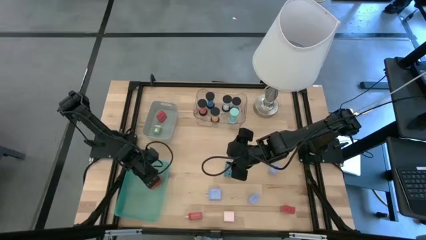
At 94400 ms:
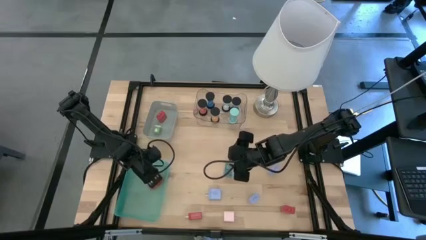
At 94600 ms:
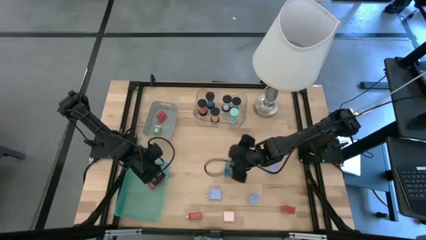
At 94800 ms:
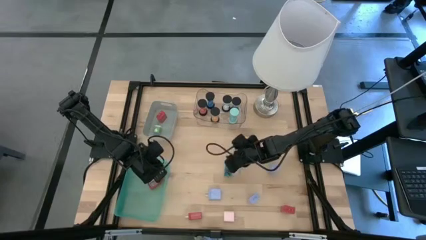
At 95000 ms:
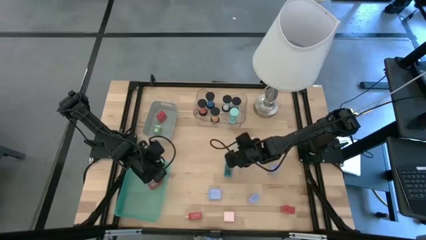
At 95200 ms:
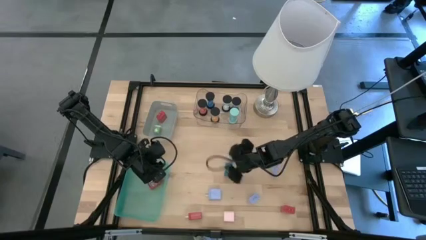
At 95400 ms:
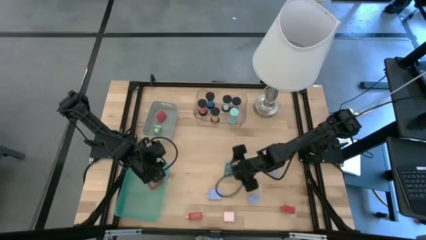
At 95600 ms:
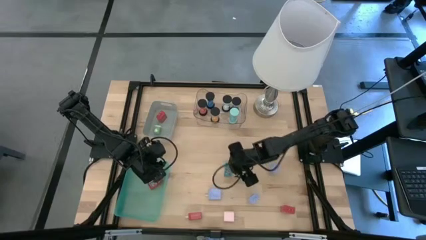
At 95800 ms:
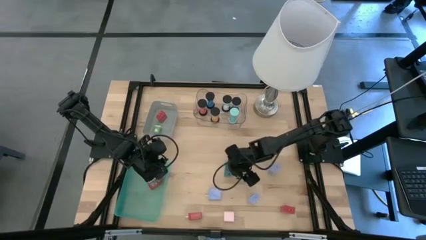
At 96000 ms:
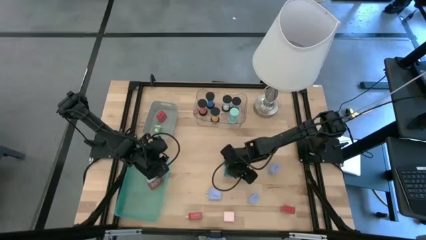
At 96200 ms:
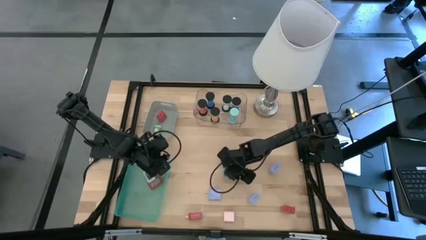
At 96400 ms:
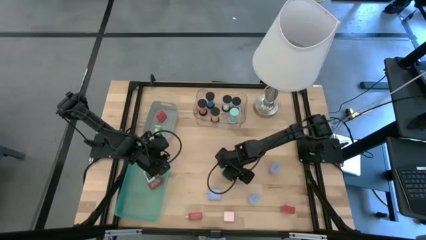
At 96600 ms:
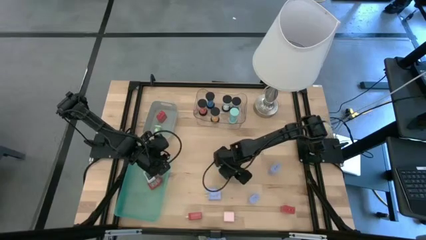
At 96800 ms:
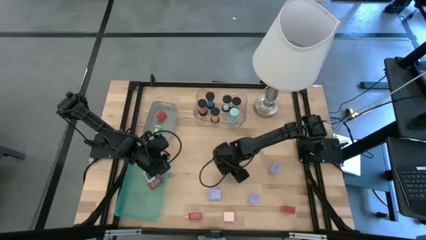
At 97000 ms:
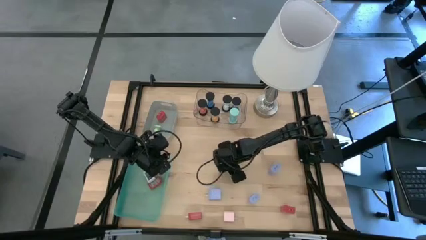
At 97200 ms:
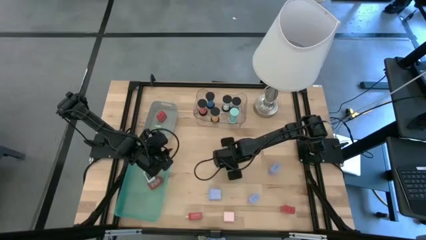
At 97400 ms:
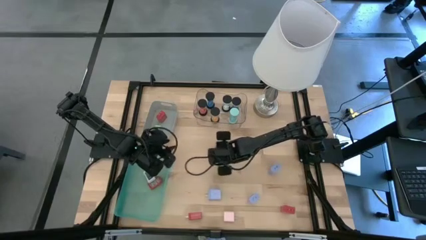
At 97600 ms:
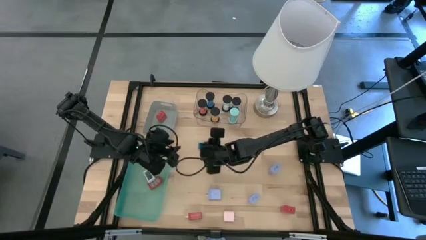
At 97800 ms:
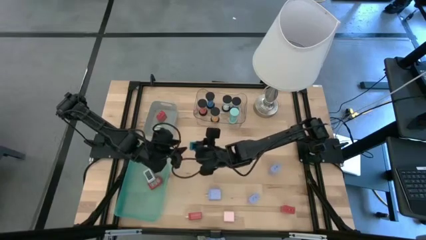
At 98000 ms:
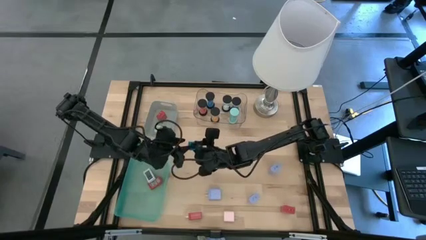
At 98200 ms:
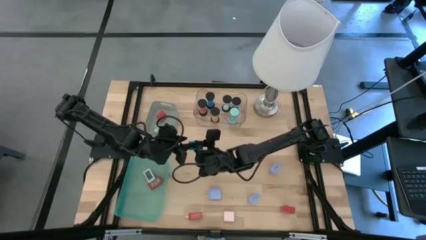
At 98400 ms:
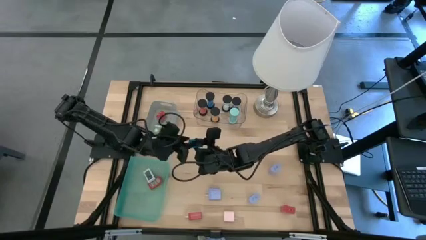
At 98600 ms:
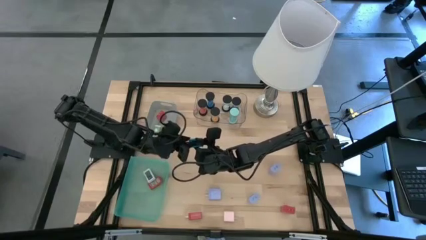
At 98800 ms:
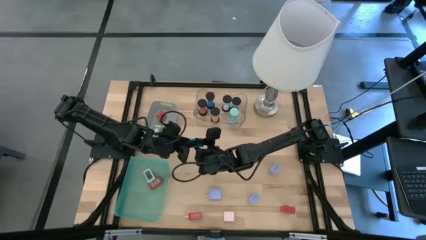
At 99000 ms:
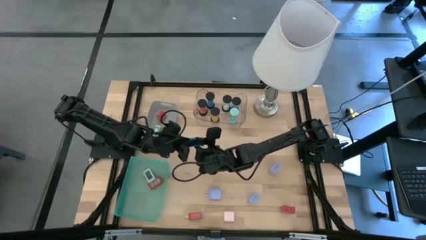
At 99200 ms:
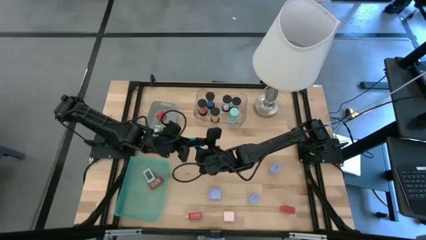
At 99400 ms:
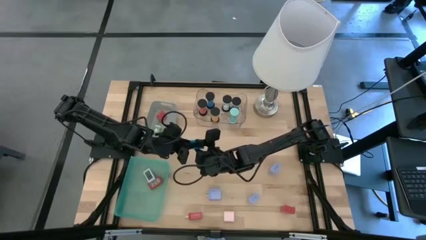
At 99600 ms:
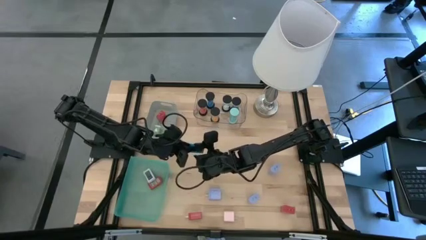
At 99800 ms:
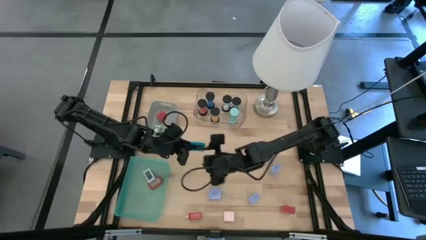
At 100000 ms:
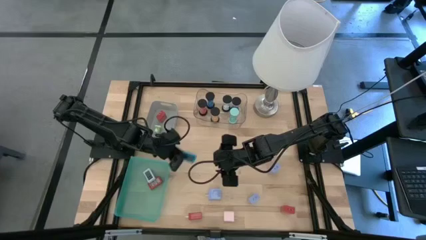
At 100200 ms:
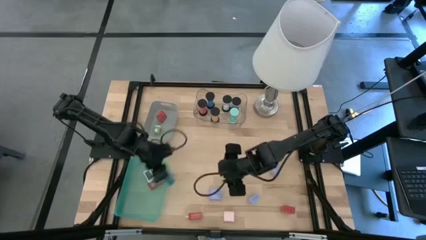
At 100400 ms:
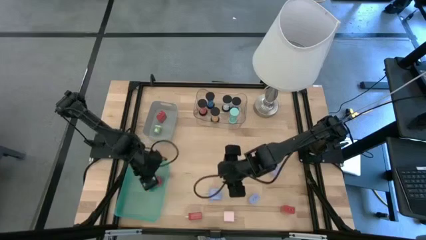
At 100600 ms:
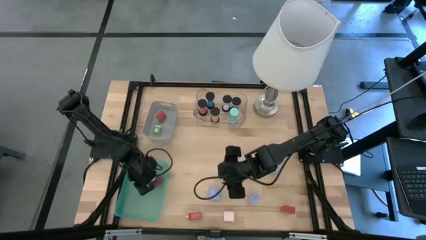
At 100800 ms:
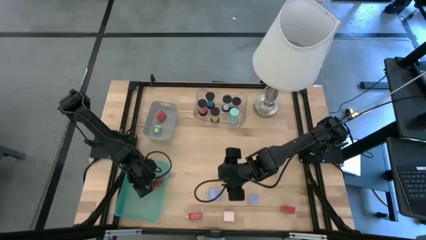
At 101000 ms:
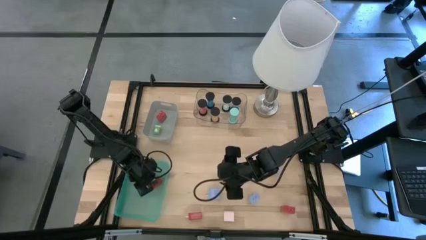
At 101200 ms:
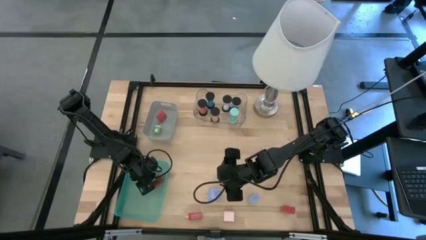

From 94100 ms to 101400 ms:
Task: Pick & Place Office items
Put the blue digital clock into the green bin

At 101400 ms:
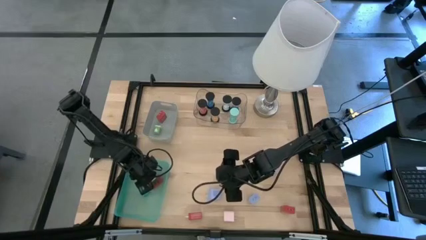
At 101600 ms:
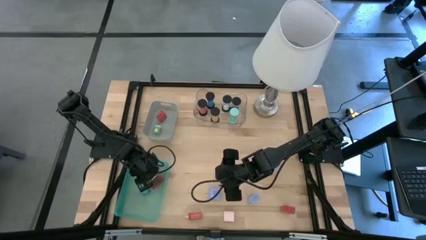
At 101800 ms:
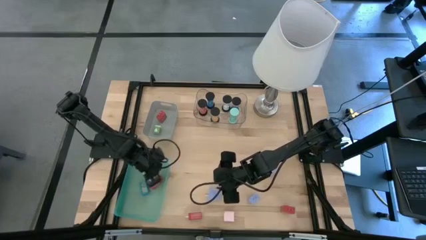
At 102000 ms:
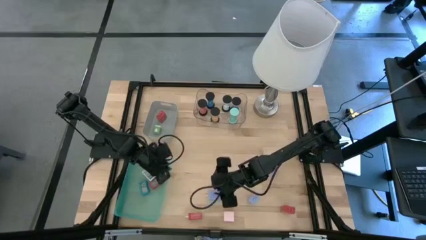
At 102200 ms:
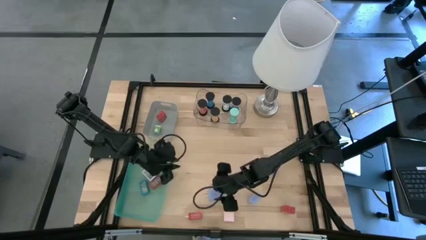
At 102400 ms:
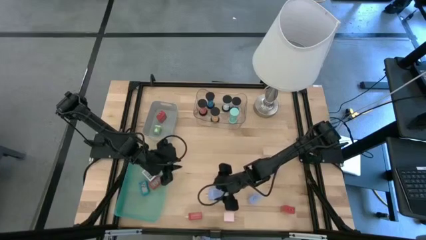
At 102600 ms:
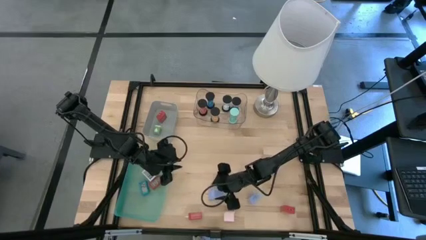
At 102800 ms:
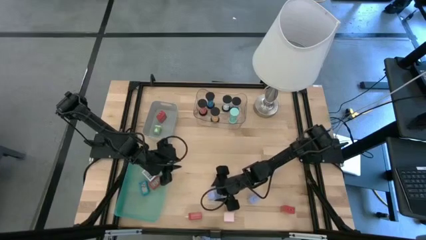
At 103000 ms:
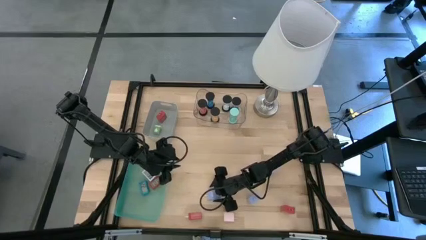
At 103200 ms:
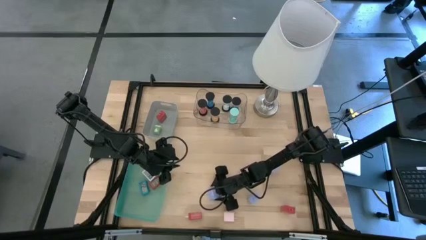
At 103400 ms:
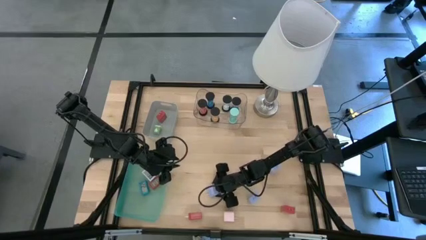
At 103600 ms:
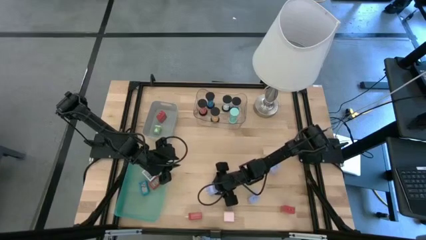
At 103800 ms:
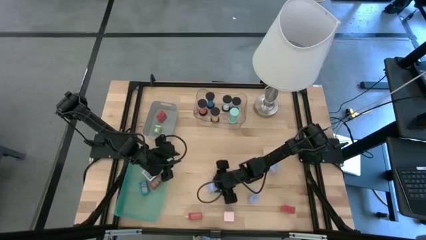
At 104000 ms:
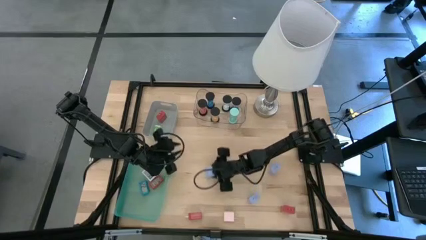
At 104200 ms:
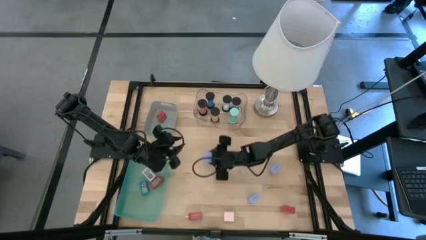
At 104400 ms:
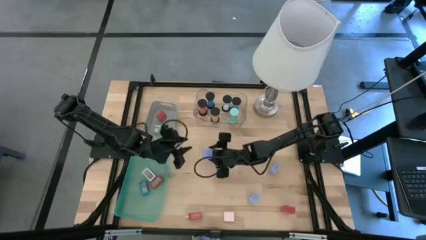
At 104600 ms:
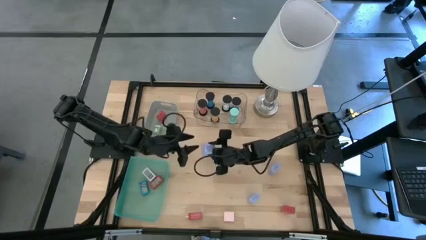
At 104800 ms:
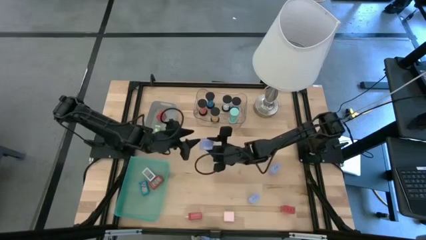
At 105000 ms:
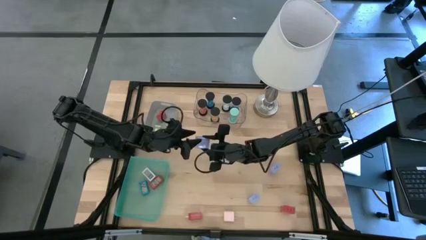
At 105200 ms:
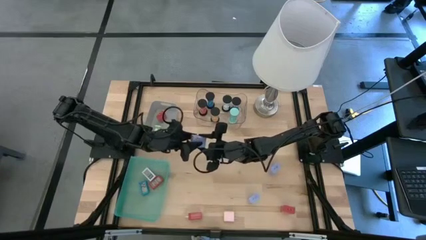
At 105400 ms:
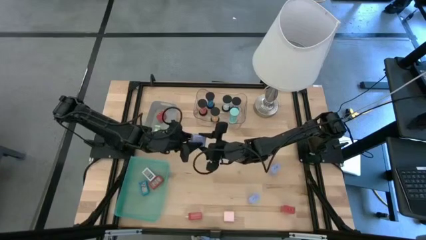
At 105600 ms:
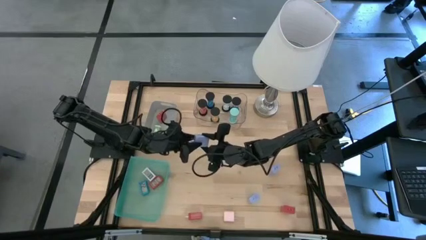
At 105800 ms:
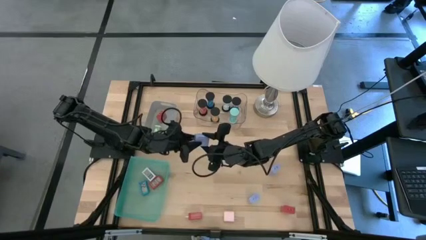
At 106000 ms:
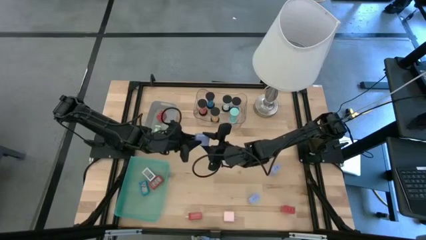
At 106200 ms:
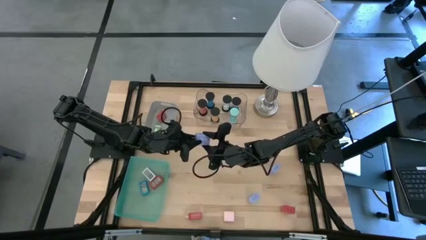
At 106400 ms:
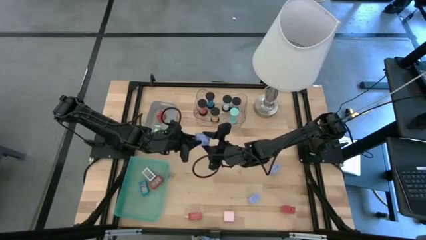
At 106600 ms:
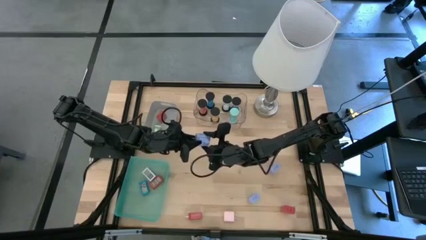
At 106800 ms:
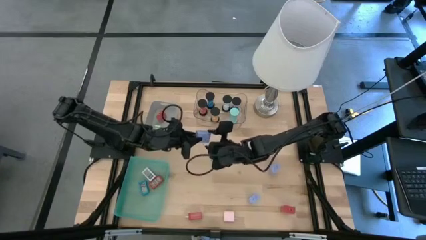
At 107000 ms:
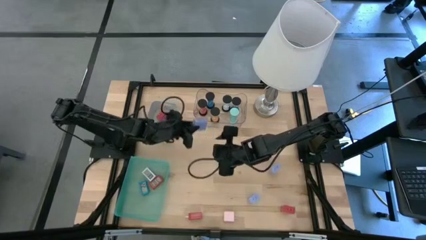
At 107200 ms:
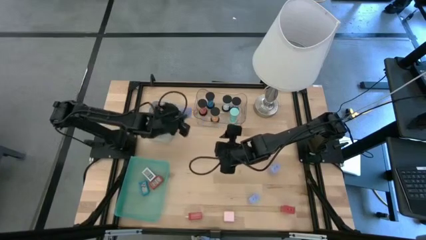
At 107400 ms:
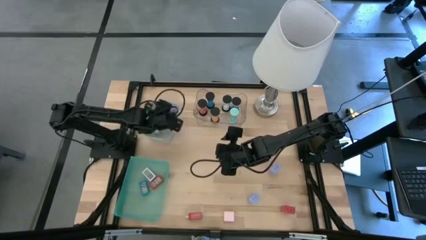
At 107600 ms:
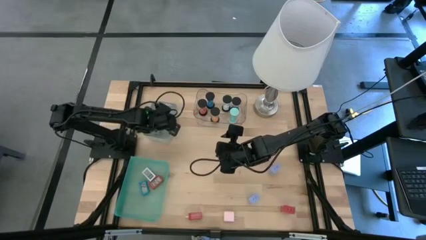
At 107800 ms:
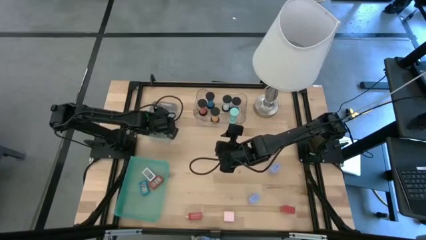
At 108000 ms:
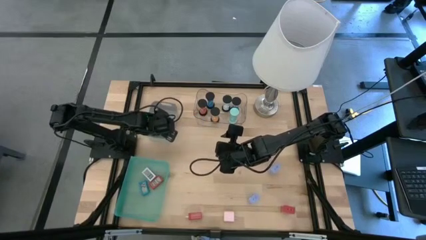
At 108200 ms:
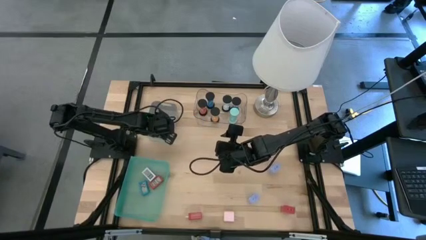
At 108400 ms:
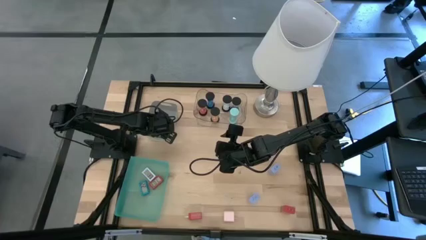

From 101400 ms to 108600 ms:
Put the bottom left light purple charger adapter into the gray bin

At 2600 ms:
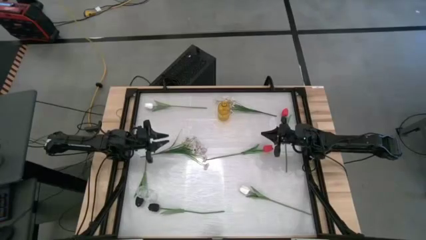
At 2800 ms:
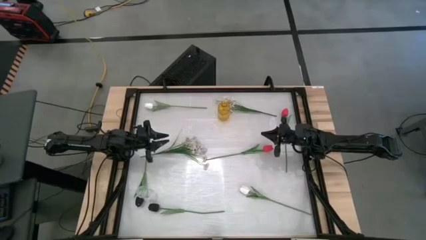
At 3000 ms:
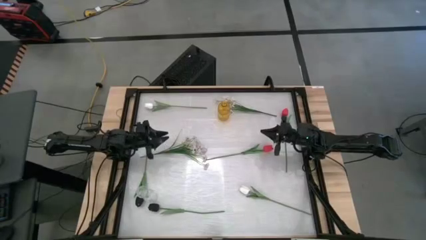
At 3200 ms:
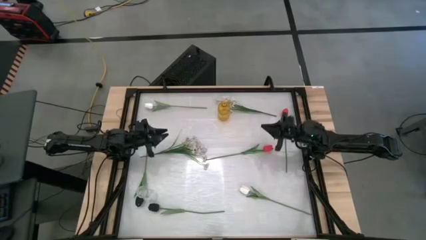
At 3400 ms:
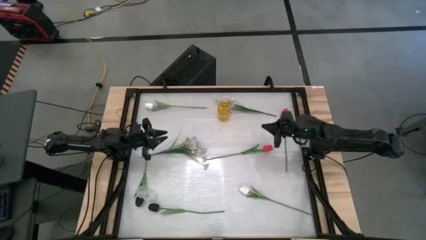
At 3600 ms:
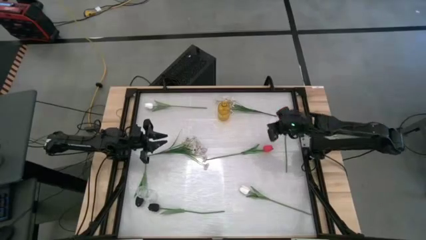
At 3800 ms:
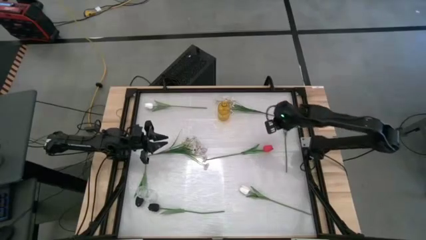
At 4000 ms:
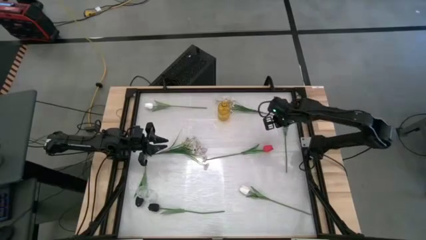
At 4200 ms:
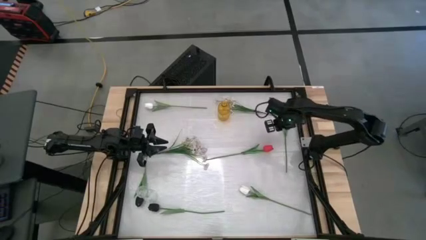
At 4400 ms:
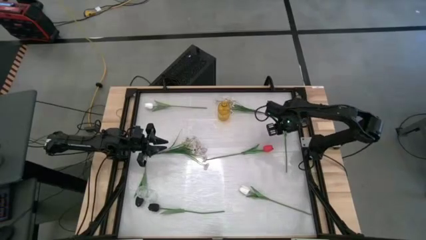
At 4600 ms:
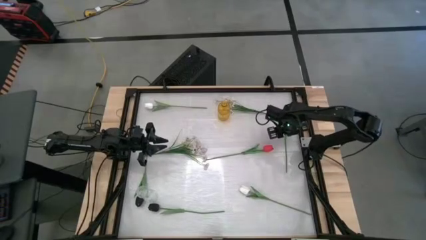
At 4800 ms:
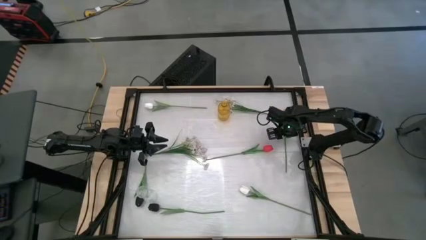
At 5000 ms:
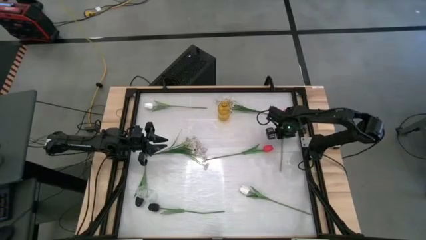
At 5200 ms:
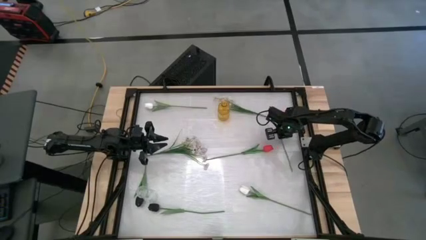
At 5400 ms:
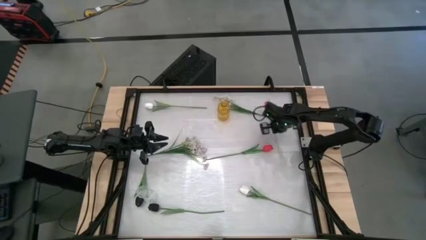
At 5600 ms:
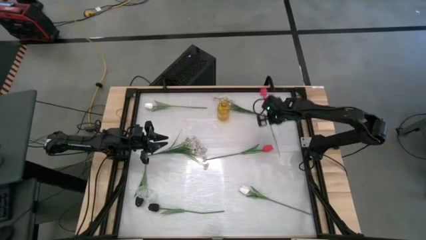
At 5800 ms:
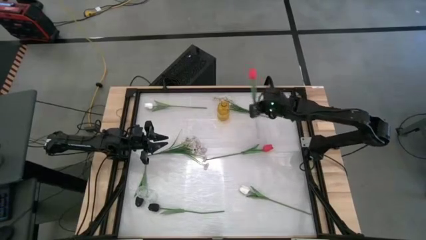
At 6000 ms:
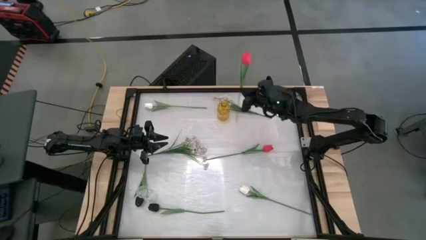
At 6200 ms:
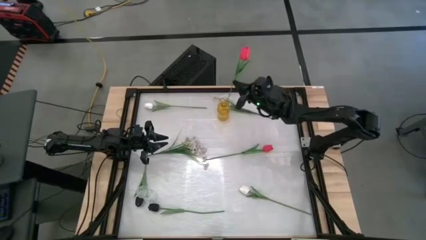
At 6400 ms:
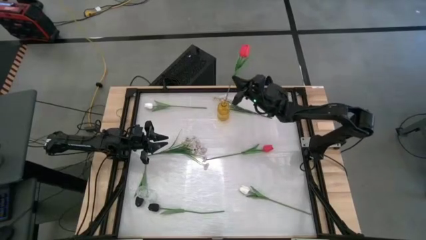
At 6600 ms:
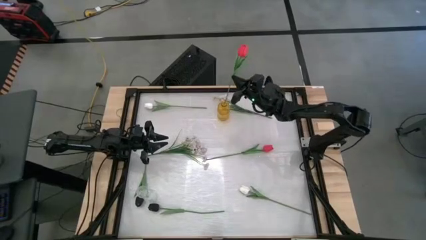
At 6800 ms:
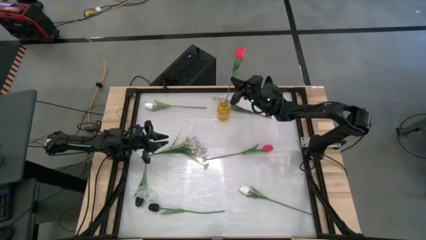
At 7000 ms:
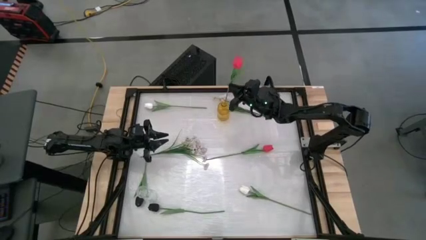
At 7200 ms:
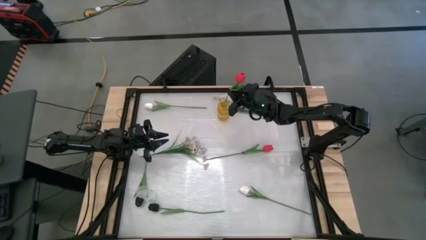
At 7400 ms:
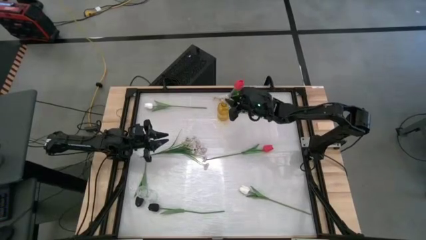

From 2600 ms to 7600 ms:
Task: Sort flowers into vase by color
Put the top red tulip into the yellow vase
